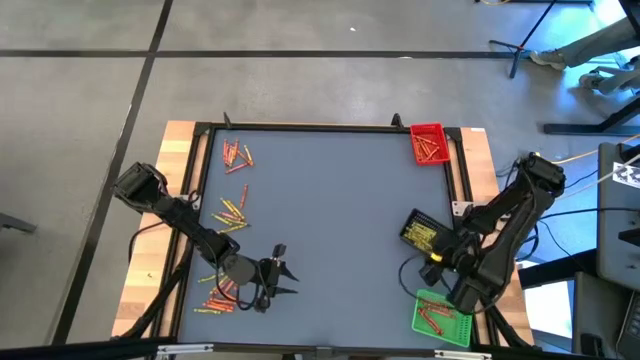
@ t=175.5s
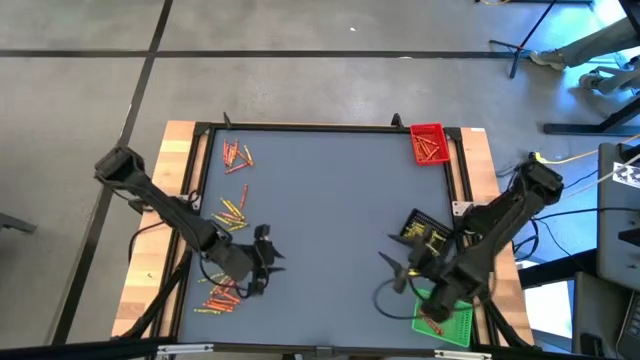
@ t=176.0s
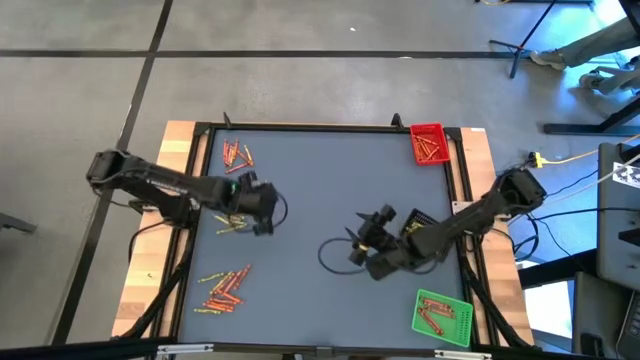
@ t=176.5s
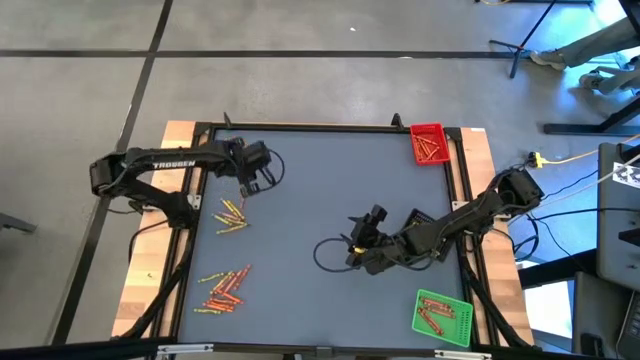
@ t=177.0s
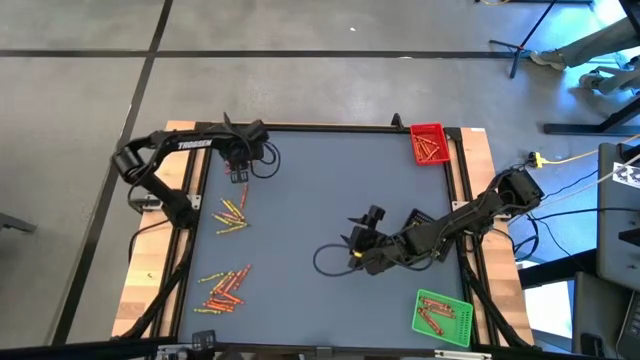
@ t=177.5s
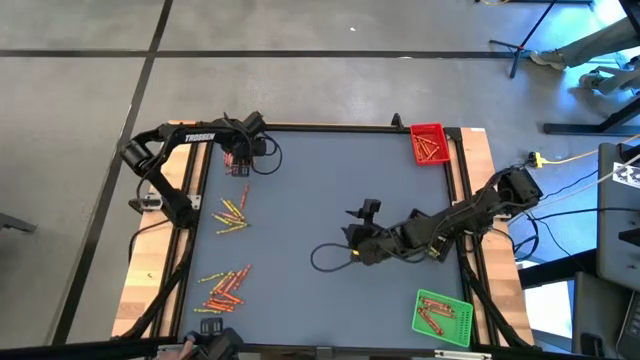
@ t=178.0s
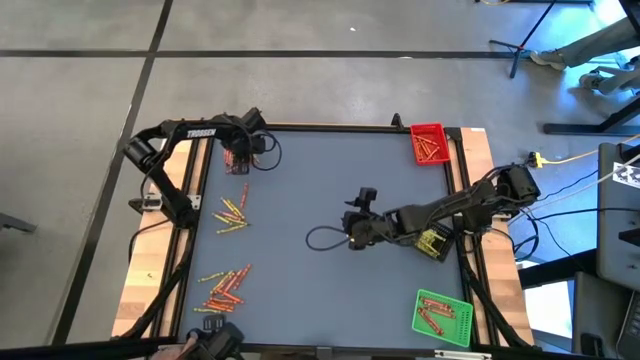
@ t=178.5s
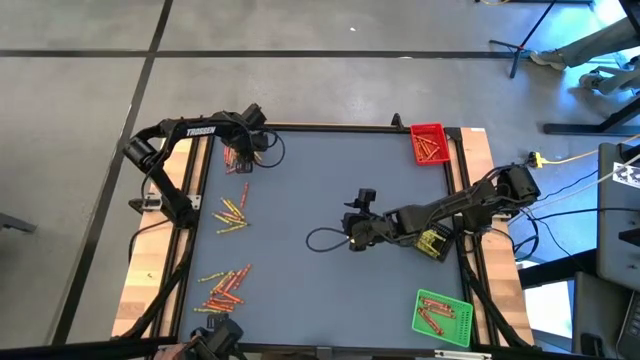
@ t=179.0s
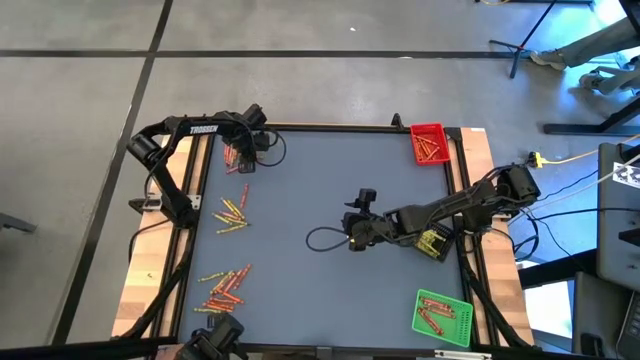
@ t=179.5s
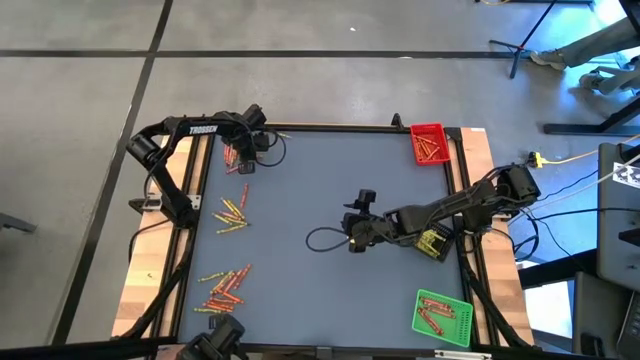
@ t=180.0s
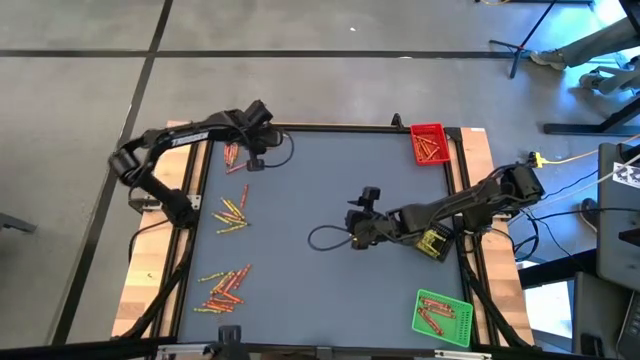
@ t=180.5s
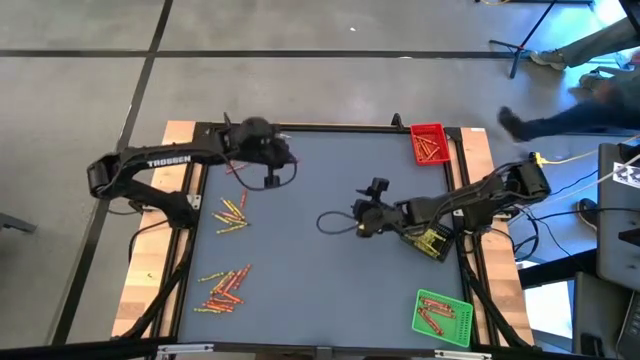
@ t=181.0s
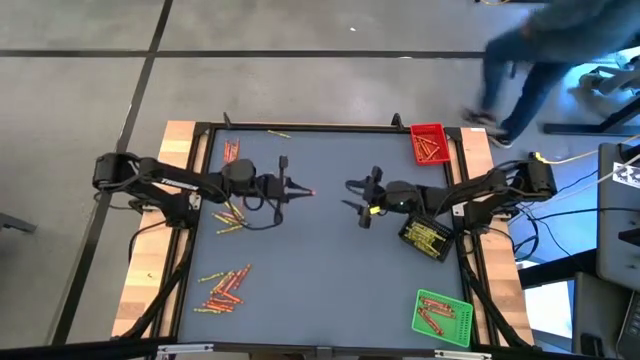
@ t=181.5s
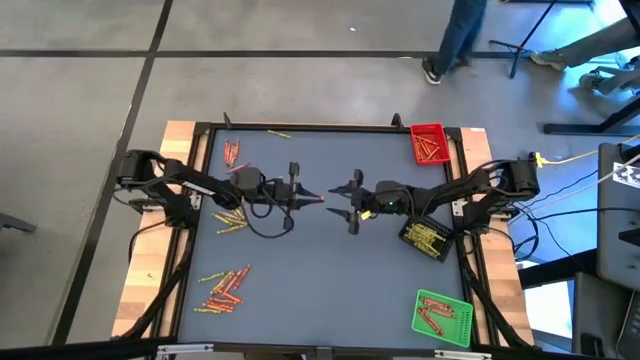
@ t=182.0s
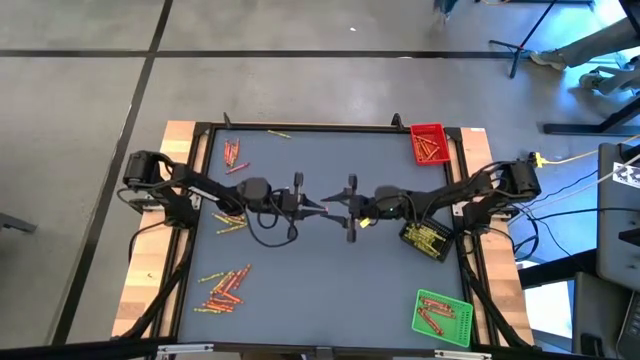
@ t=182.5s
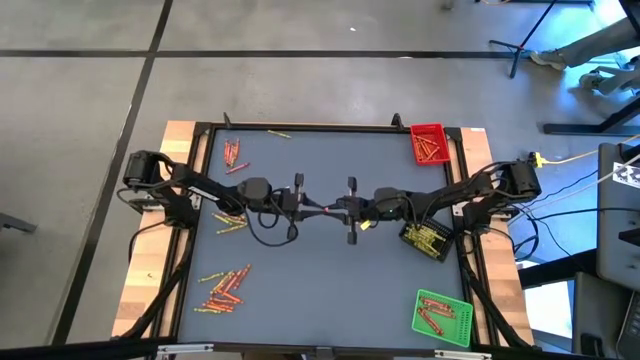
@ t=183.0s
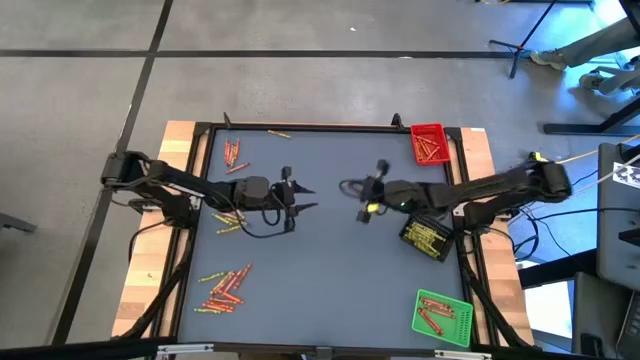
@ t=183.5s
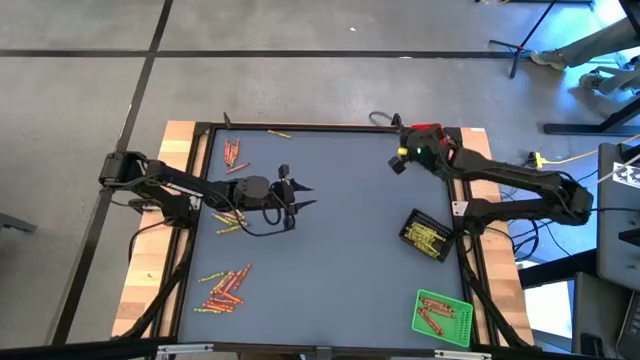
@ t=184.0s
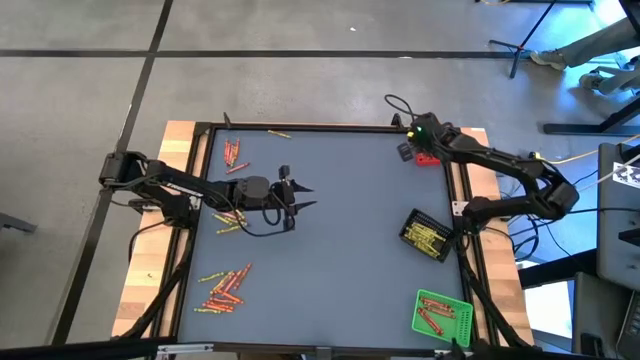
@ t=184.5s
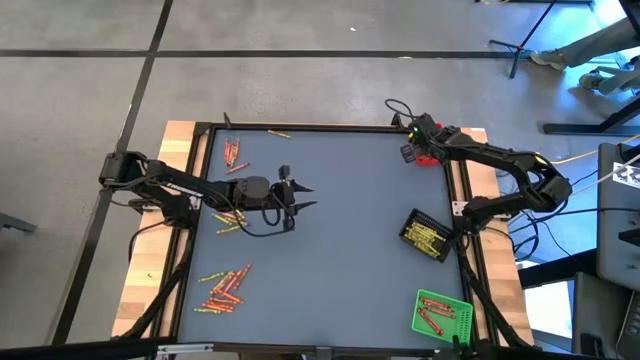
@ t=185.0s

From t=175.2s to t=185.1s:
Task: Sort crayons
Put the orange crayon into the red basket

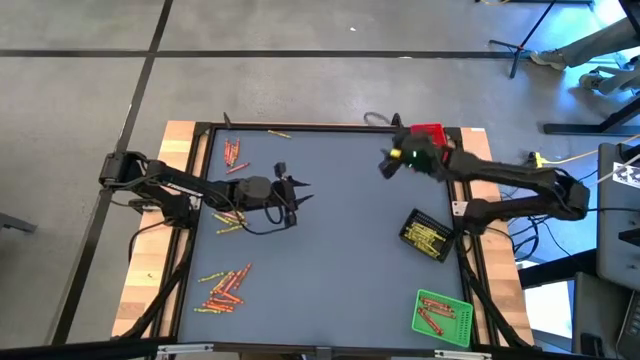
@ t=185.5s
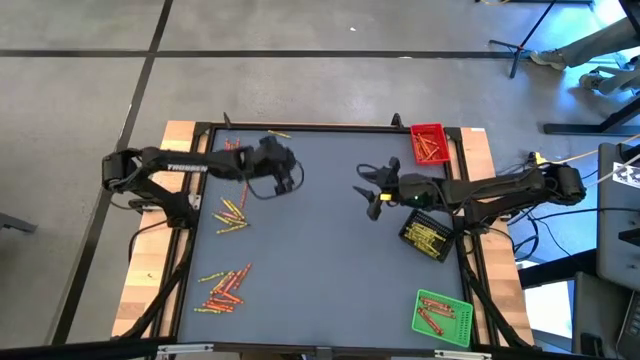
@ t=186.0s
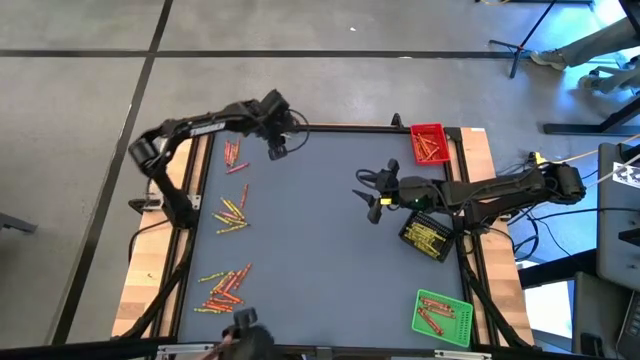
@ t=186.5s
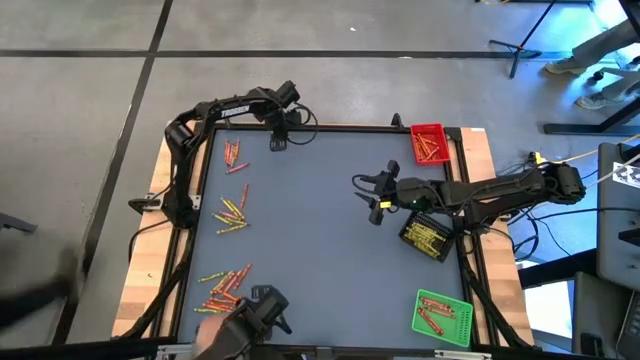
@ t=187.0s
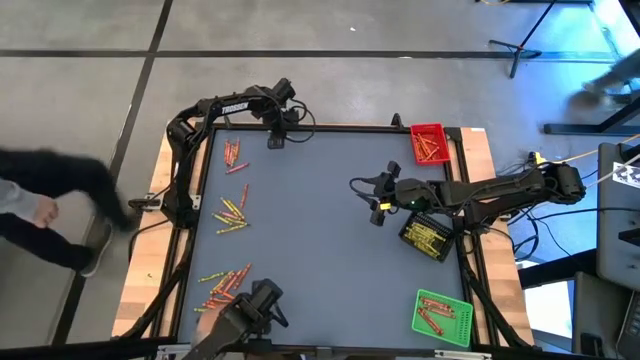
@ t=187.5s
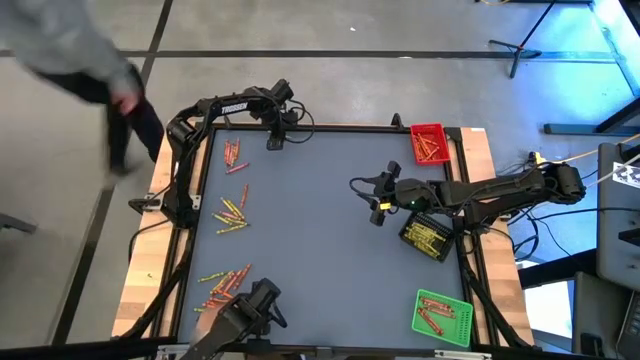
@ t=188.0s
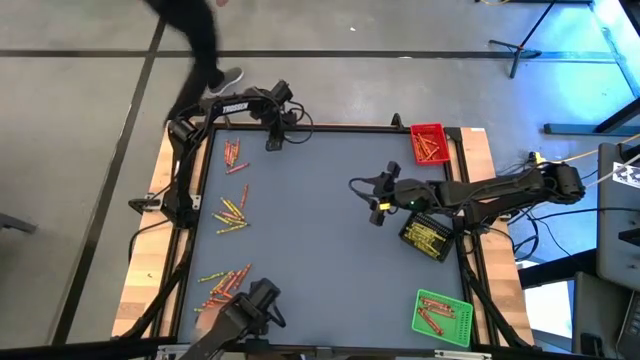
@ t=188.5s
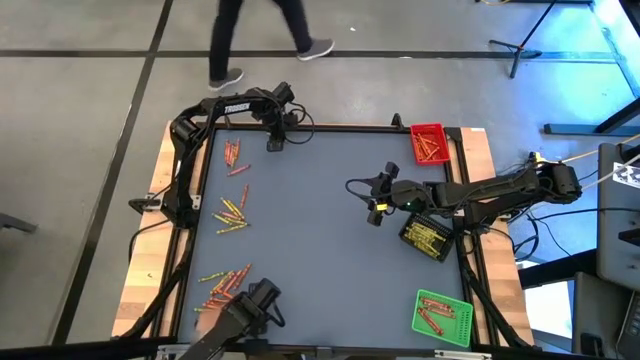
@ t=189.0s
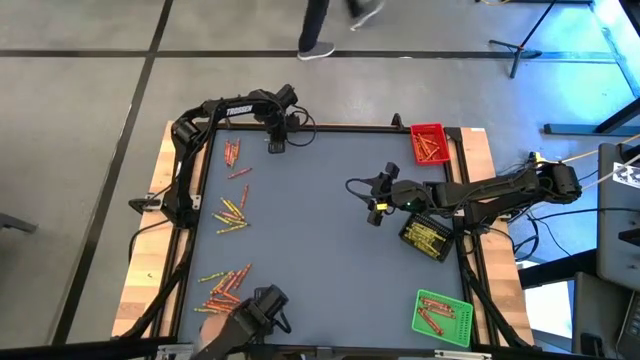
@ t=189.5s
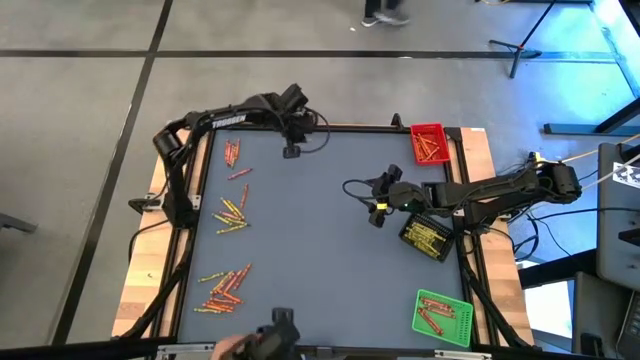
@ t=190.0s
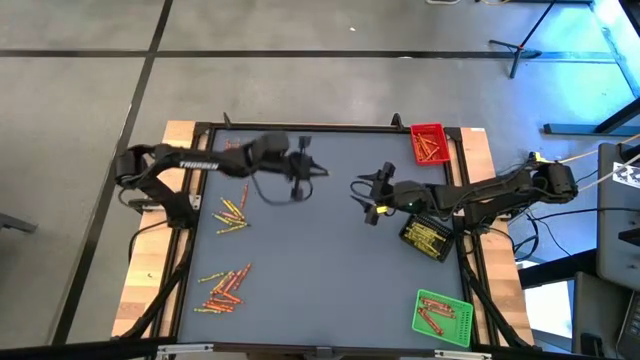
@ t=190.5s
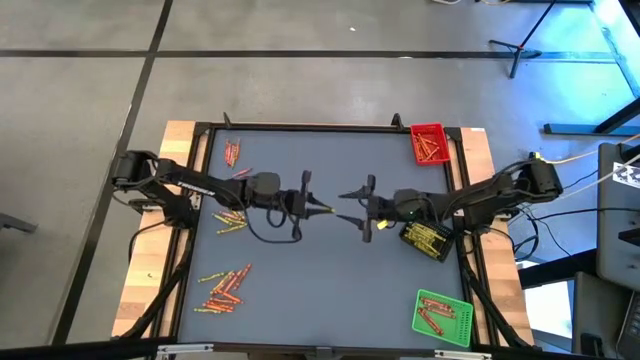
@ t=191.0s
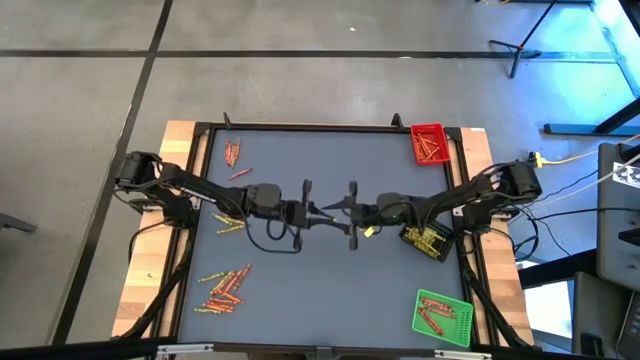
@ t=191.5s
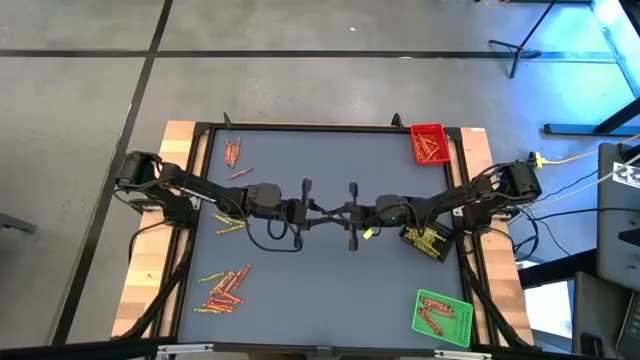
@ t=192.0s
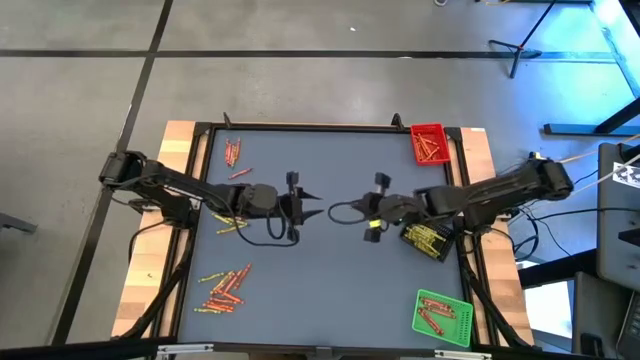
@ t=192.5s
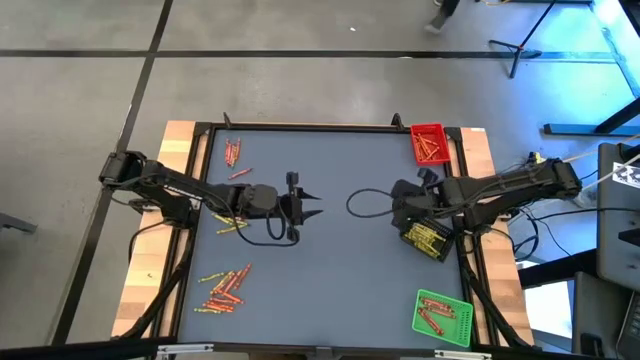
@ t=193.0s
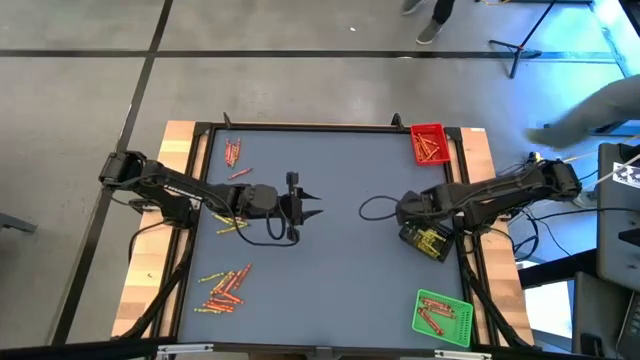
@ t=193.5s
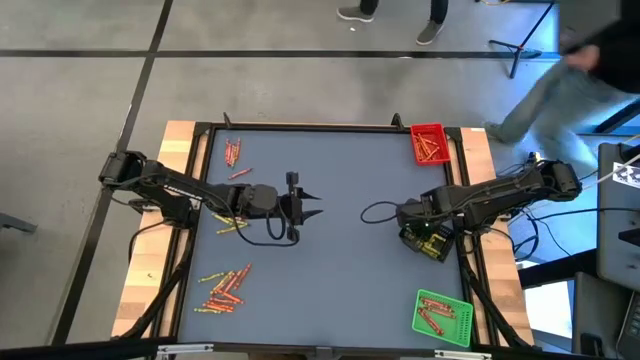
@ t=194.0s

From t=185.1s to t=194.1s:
Put the yellow green crayon into the black basket
